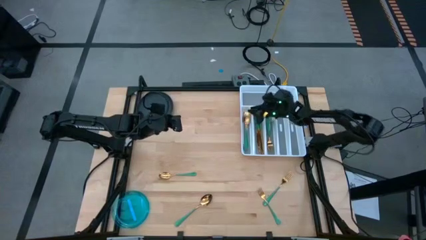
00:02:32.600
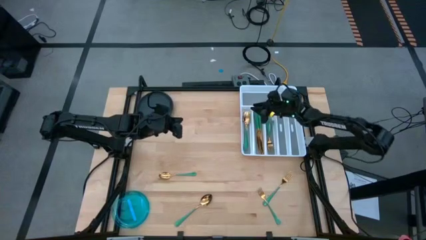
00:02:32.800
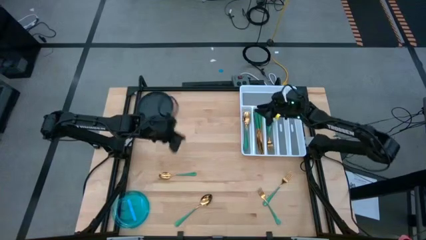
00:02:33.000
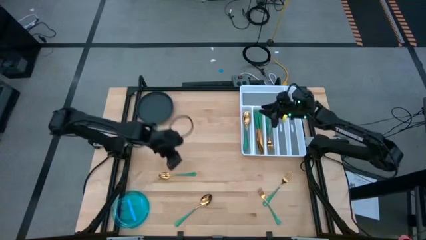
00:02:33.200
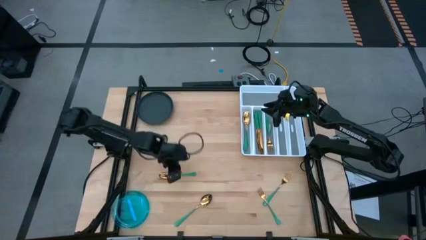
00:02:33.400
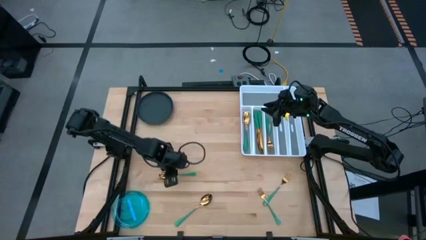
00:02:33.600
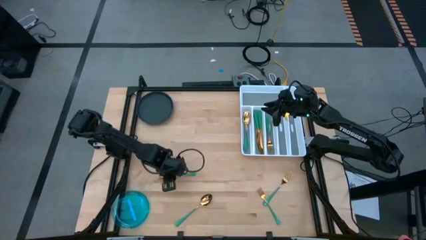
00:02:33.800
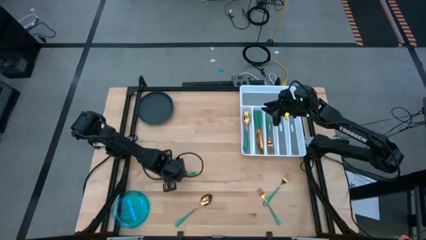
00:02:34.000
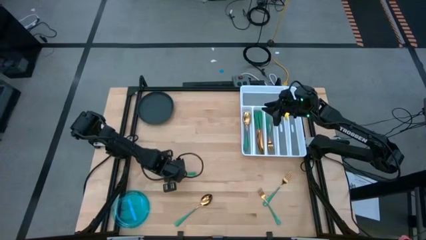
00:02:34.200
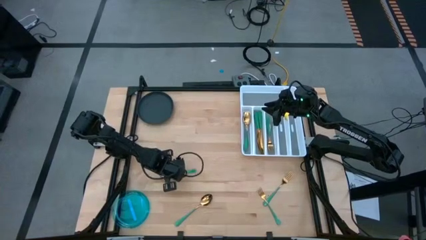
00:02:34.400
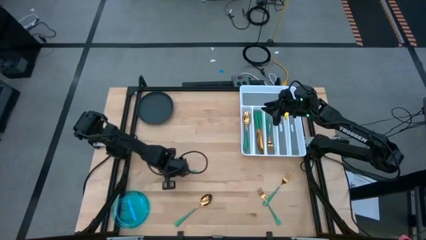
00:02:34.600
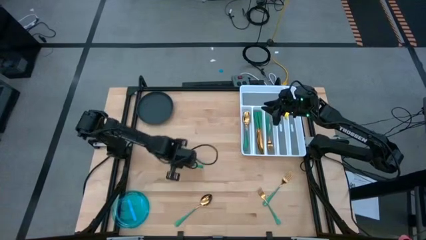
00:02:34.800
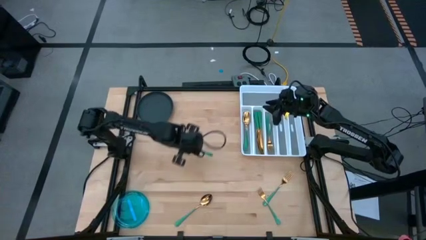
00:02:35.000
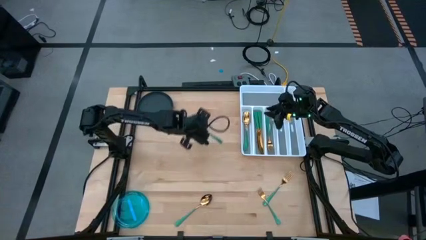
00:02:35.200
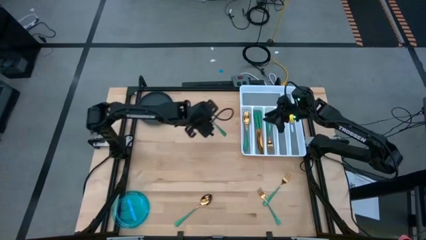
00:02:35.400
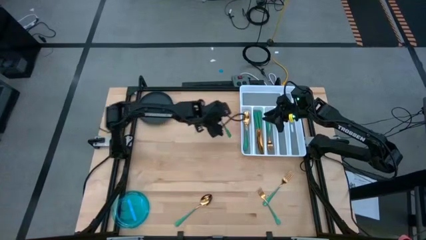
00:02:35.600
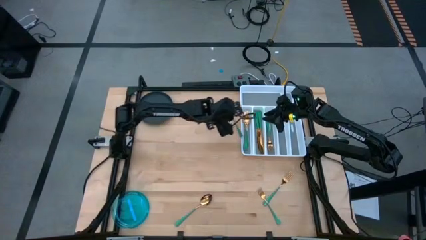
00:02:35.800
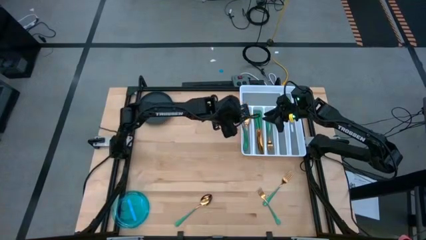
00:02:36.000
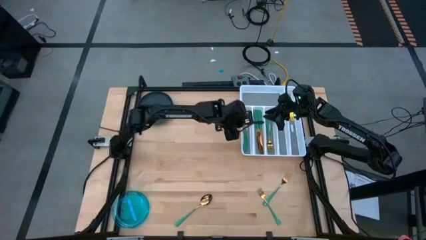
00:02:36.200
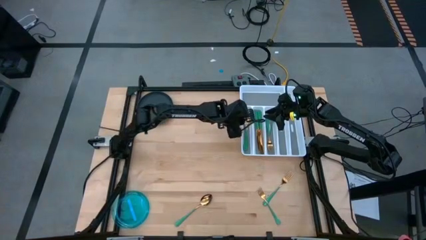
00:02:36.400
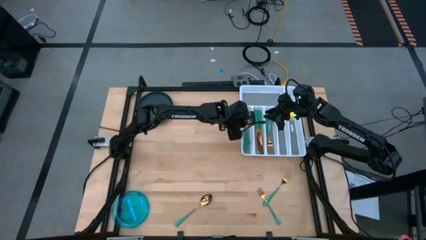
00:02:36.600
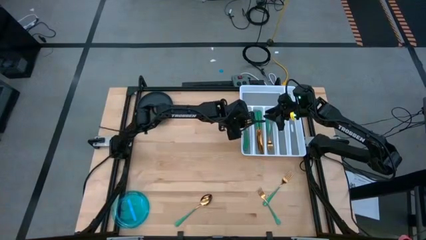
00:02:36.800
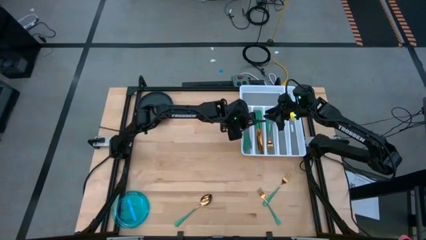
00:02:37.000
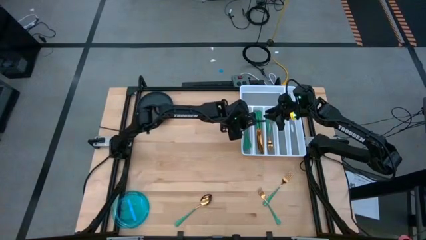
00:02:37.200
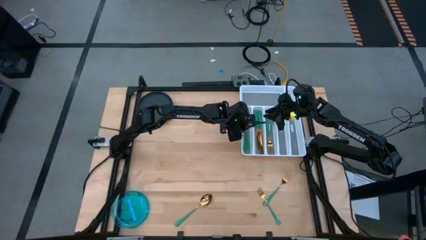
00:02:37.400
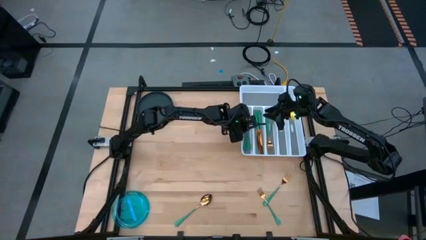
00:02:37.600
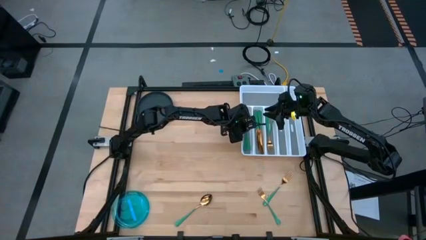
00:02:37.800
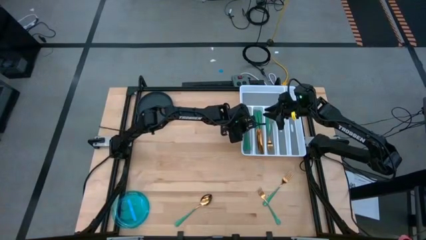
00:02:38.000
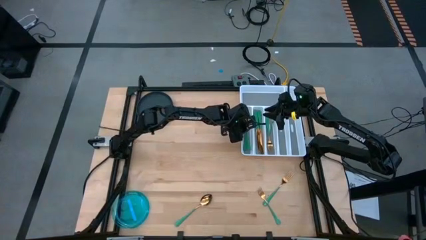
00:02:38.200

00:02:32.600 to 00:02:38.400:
Task: Sort silverware
Put the green spoon into the silverware tray

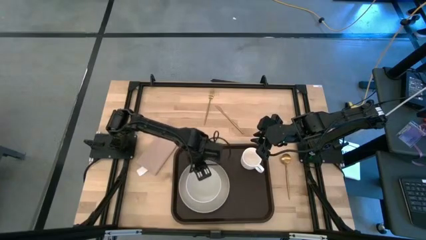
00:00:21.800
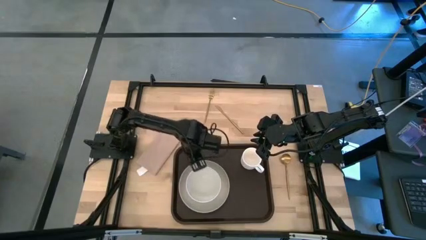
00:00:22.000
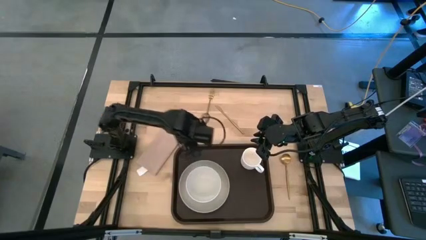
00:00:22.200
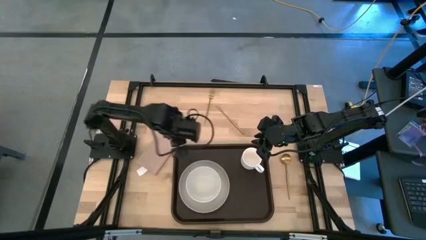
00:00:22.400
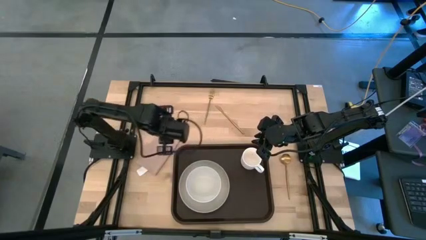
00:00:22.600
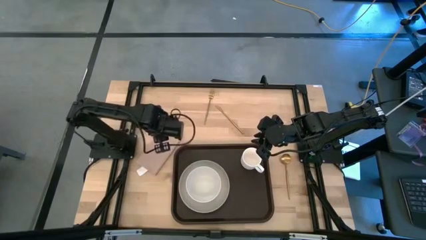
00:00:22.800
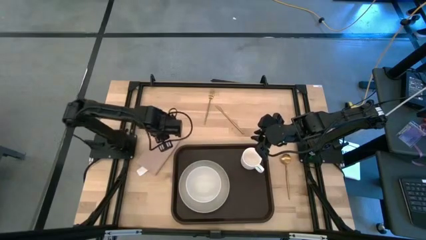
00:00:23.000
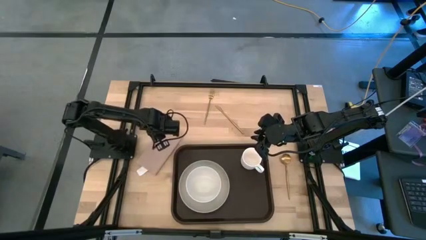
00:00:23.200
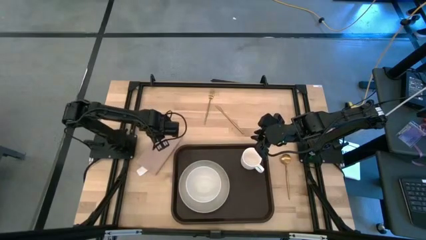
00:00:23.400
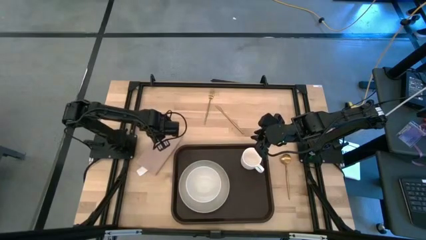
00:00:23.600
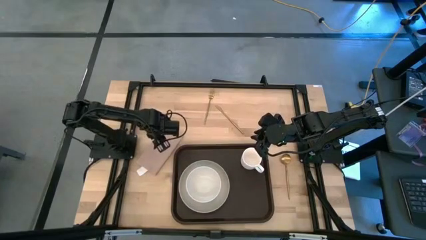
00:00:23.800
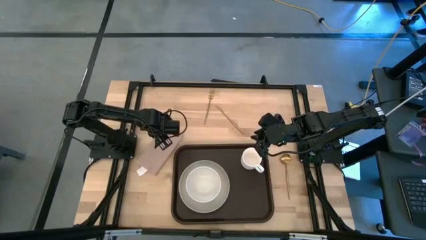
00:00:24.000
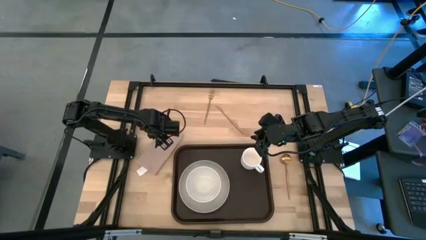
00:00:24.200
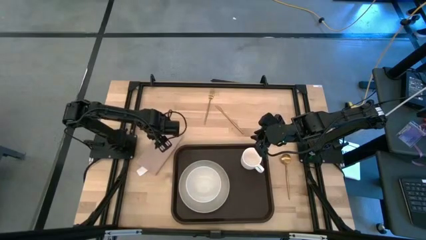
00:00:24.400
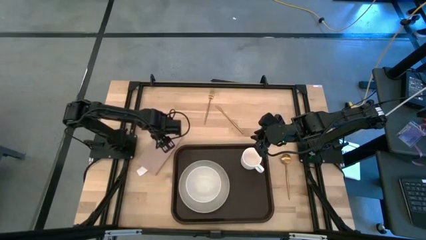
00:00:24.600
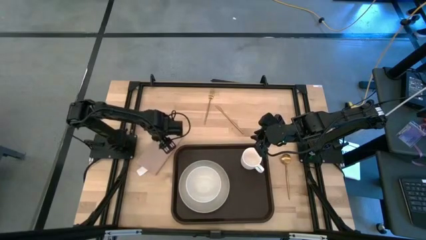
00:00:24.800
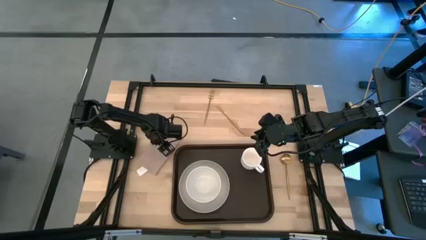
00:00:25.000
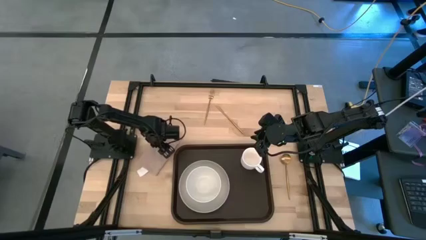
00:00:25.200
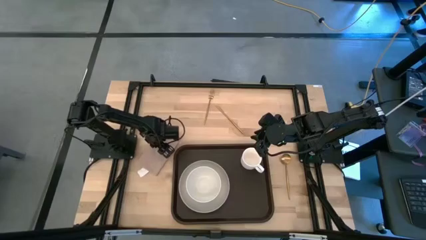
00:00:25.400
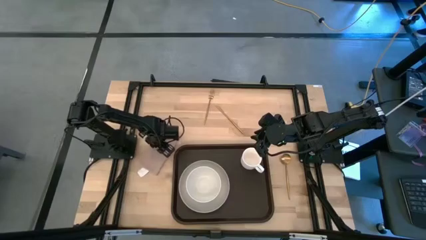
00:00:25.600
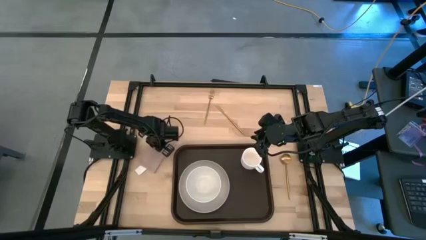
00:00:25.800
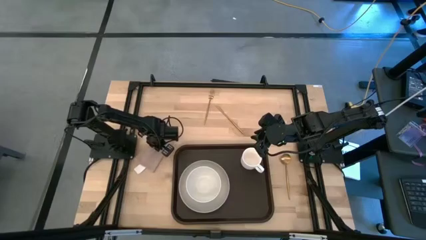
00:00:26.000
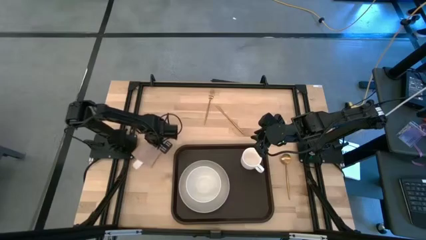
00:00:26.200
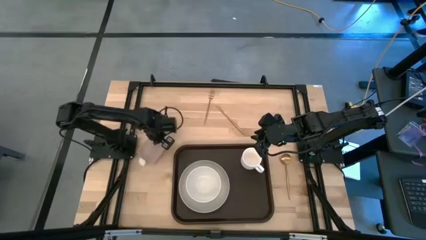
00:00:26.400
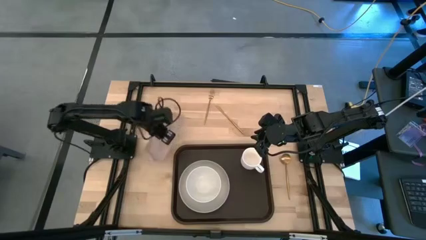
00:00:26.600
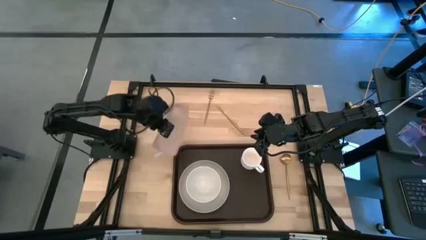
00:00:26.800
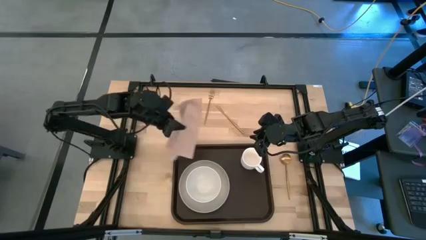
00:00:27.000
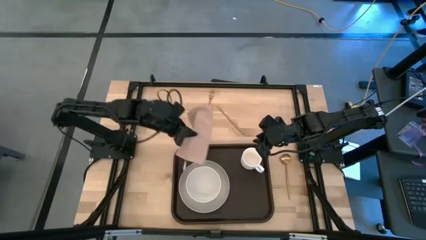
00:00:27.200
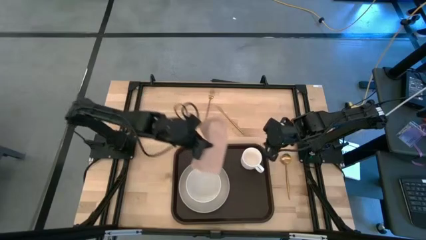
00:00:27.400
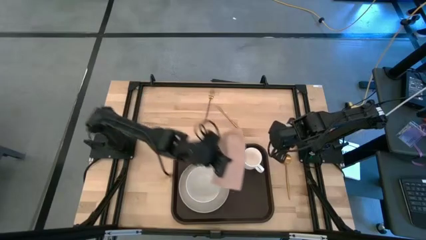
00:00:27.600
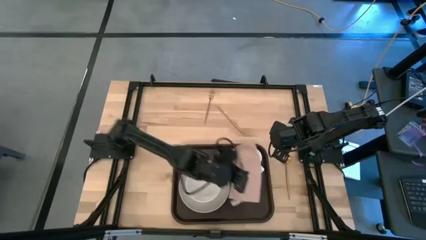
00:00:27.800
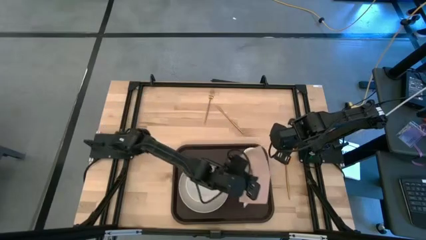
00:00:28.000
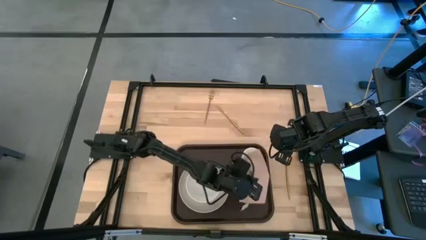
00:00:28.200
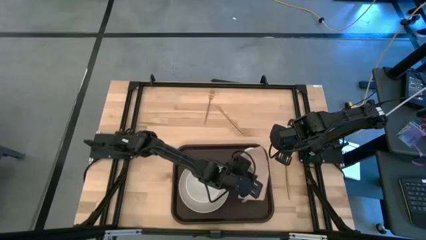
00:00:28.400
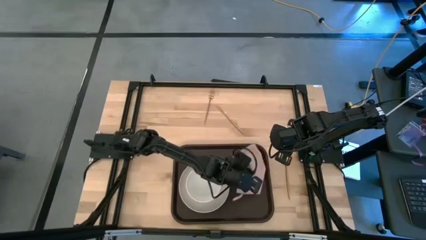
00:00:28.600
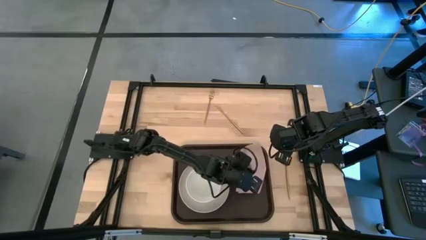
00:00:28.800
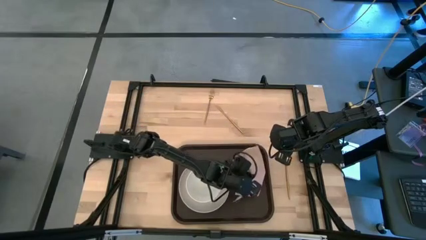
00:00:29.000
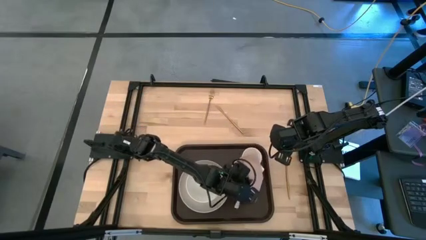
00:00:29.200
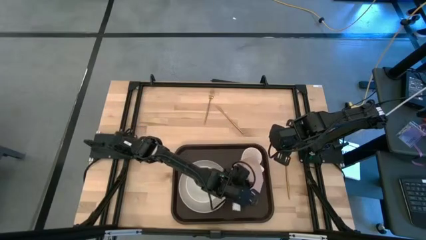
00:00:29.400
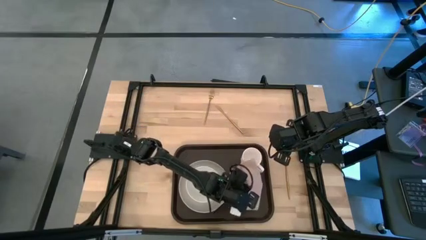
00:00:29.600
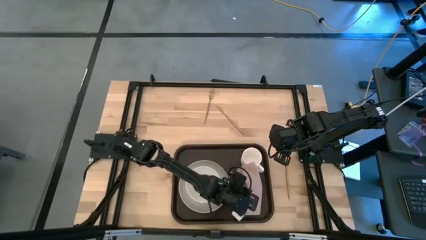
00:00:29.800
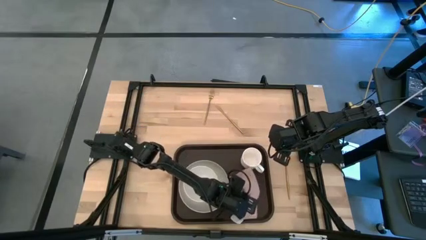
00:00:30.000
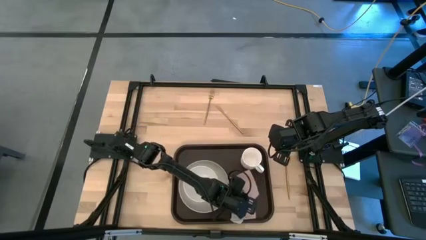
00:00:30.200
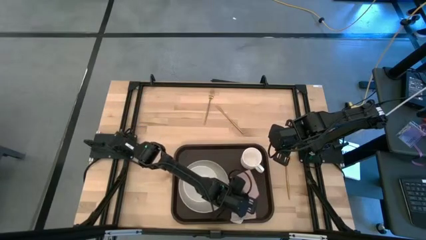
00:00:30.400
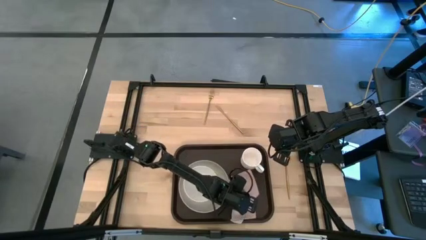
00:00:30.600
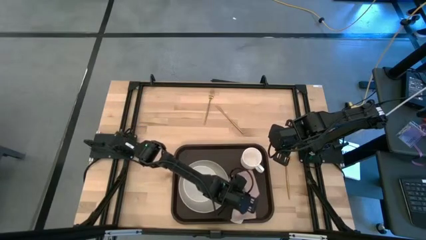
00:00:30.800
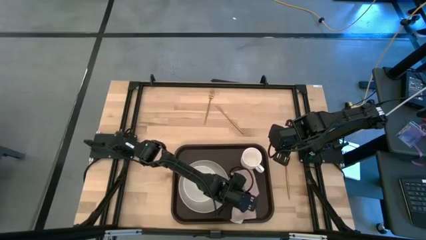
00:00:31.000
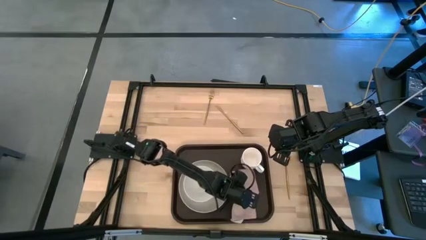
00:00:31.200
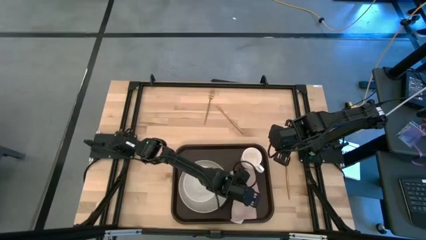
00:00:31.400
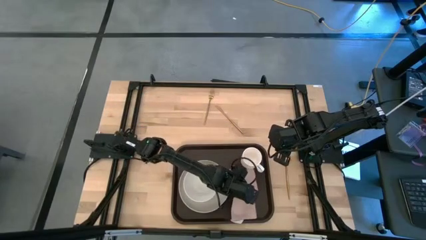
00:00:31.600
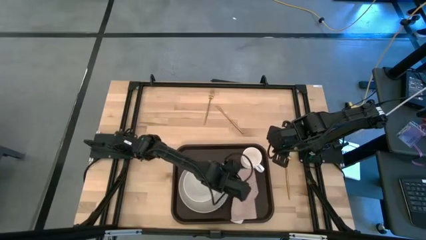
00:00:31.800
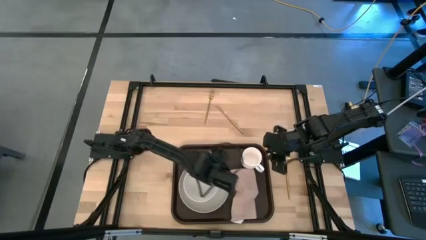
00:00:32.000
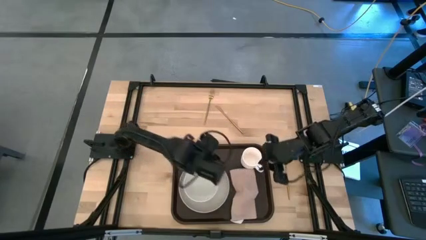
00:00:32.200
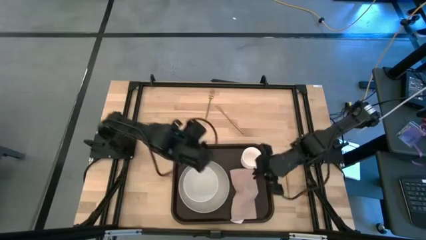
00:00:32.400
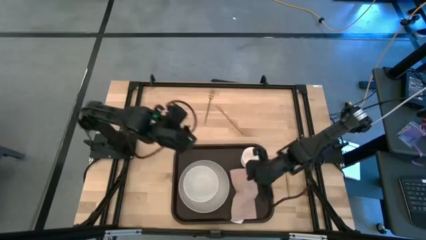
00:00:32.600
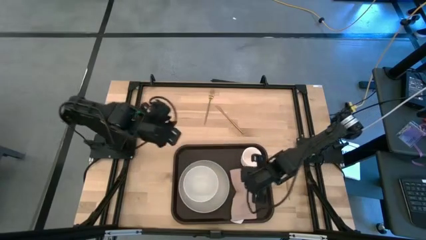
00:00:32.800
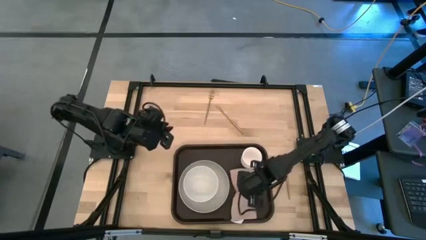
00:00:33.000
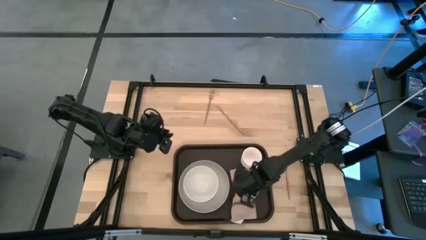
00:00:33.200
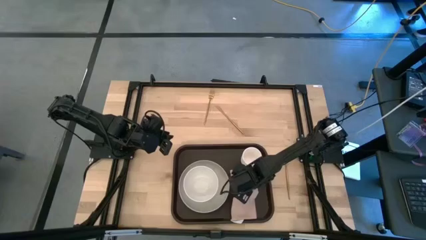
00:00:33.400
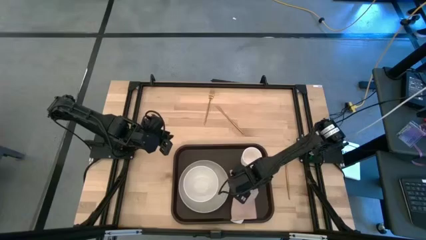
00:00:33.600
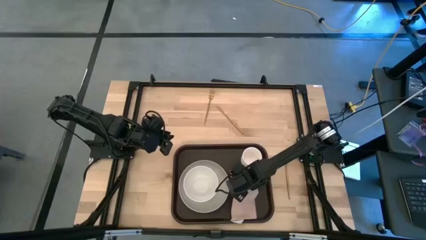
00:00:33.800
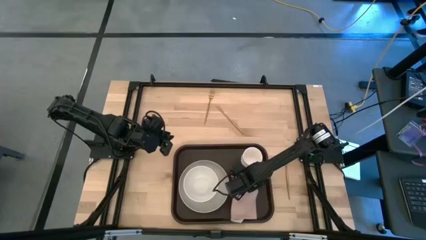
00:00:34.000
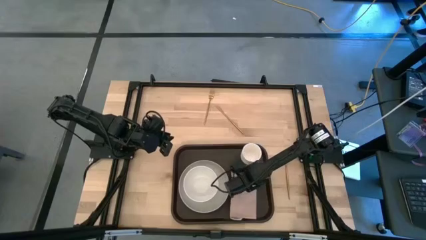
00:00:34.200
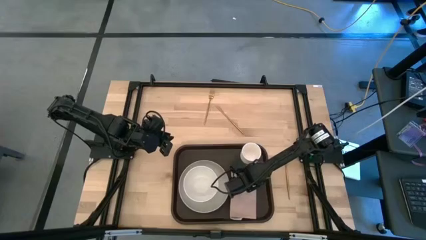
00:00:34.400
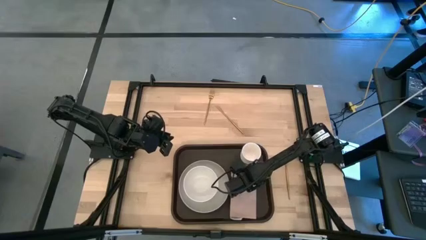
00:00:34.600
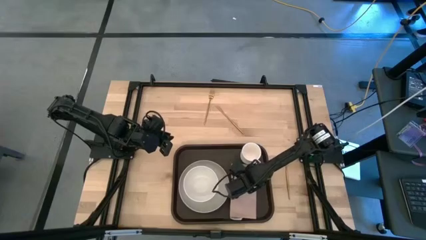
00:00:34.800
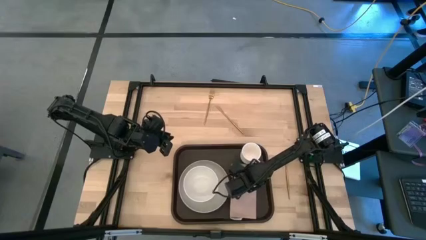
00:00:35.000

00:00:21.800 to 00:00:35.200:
Task: Set up tray
Put the brown napkin on the black serving tray to the right of the gray plate
